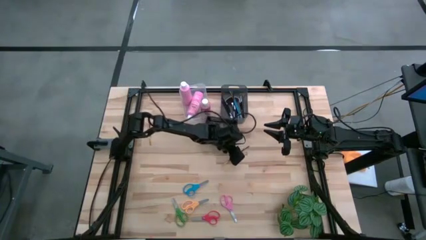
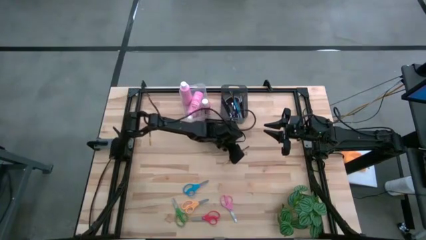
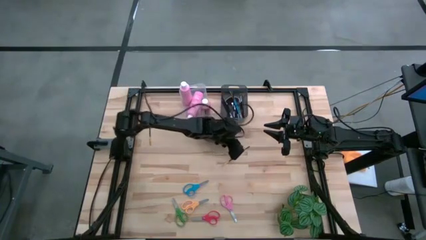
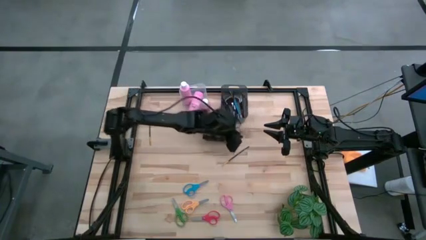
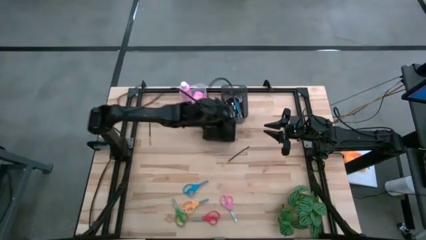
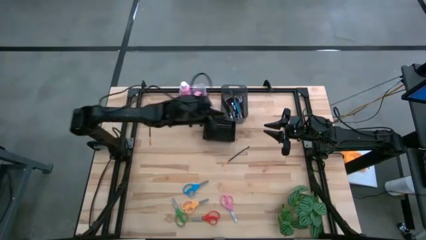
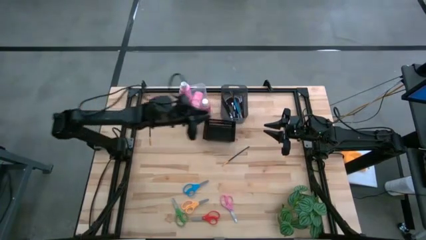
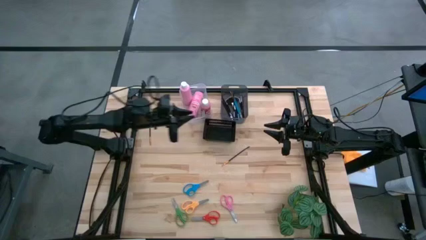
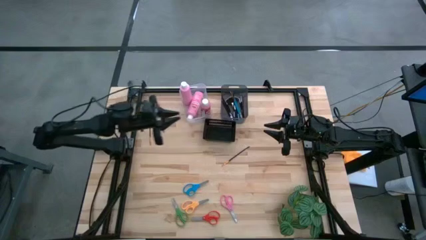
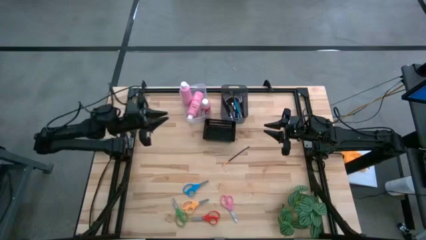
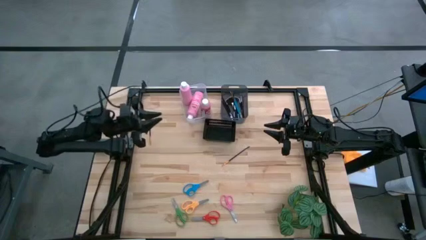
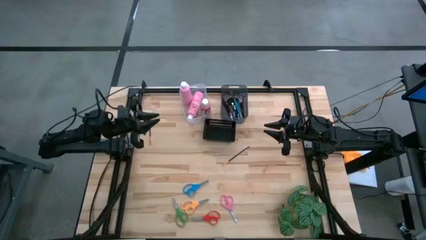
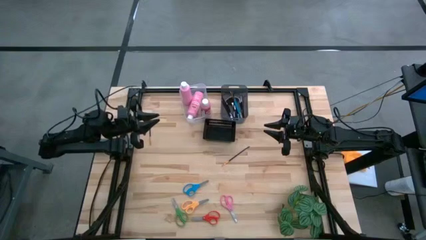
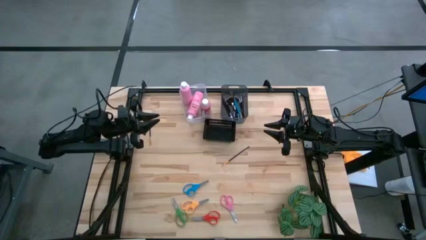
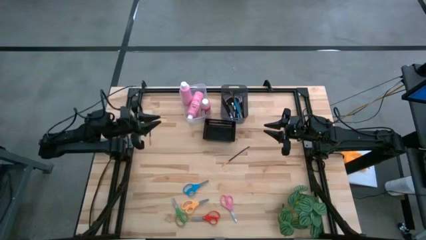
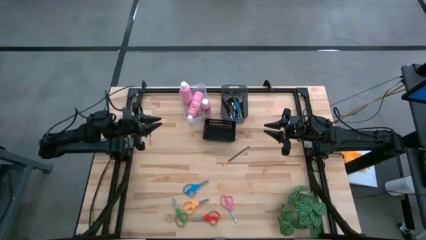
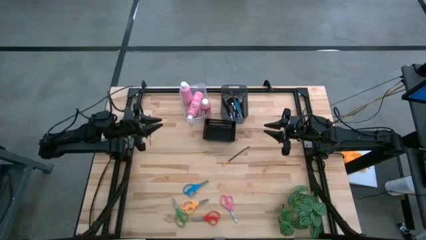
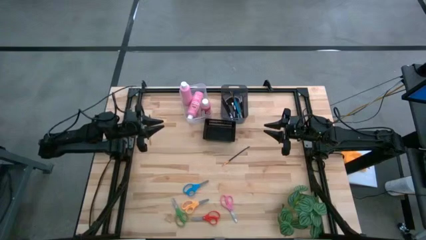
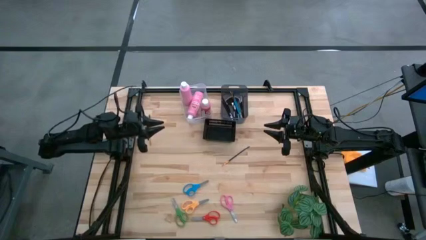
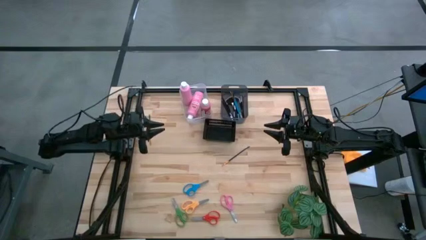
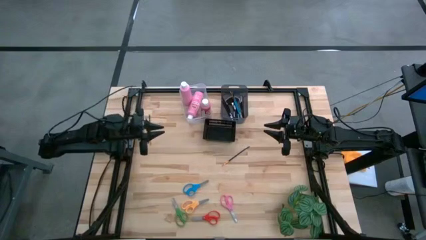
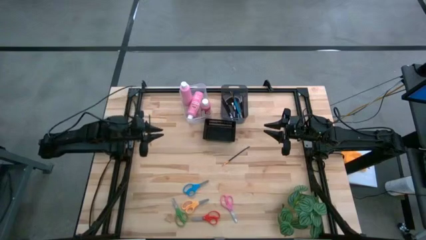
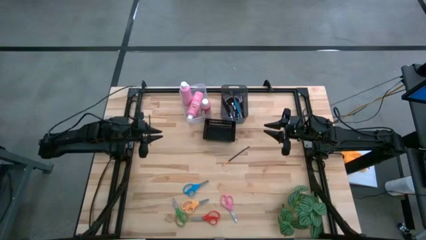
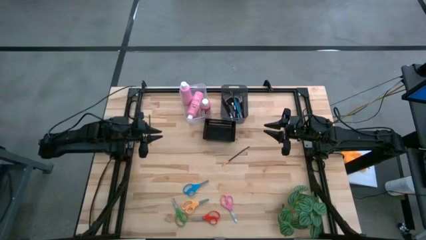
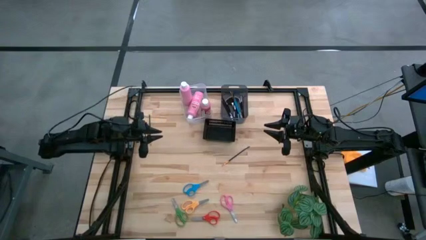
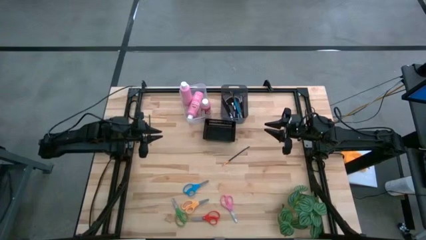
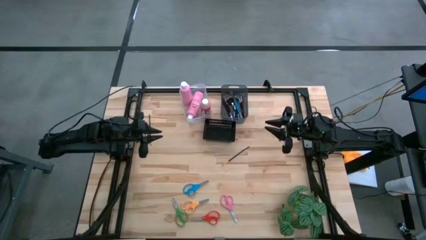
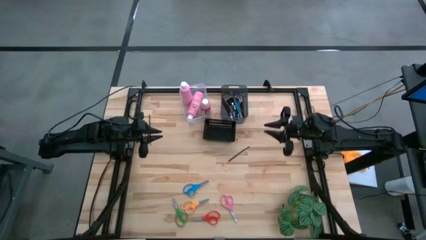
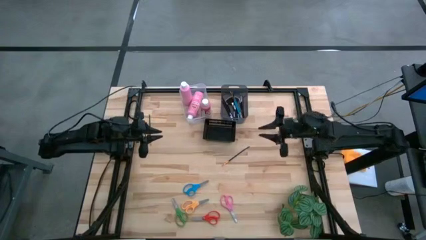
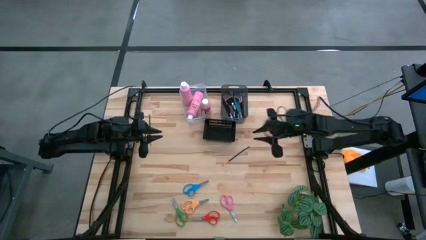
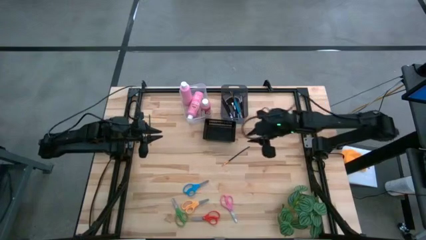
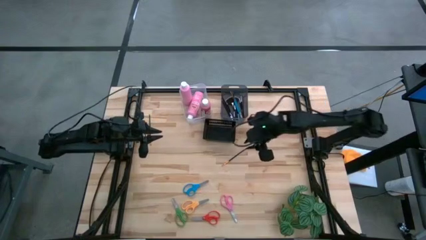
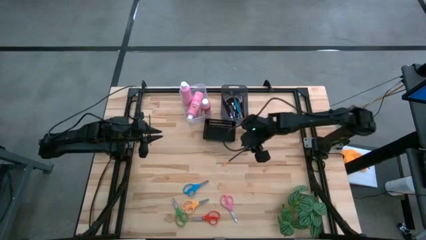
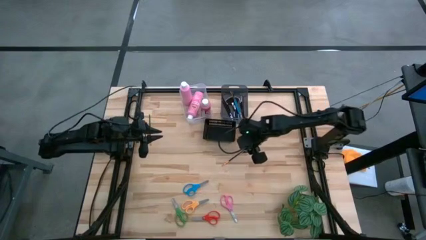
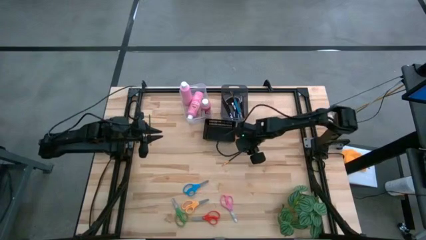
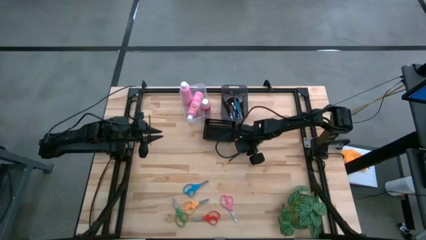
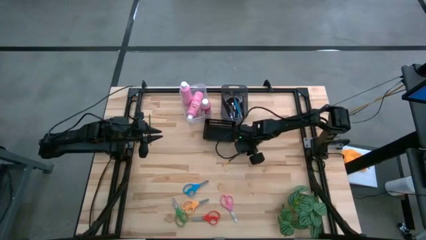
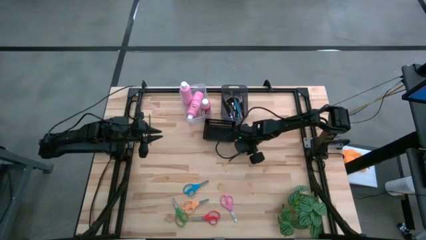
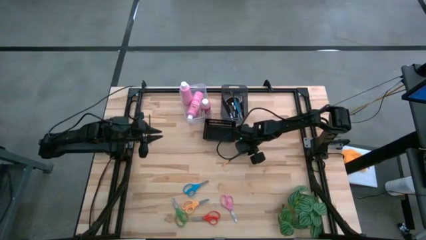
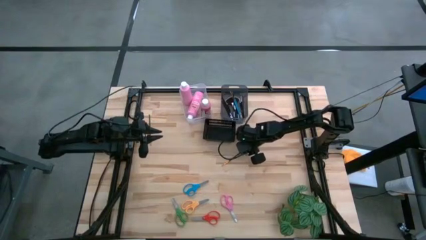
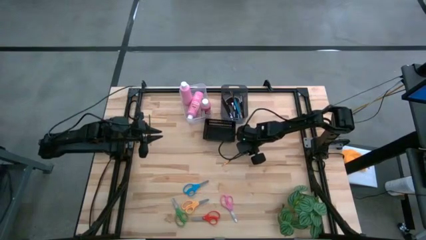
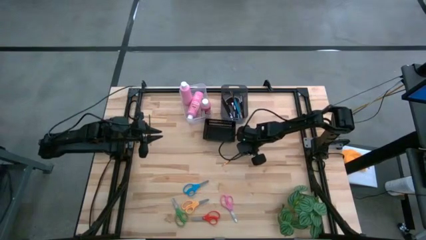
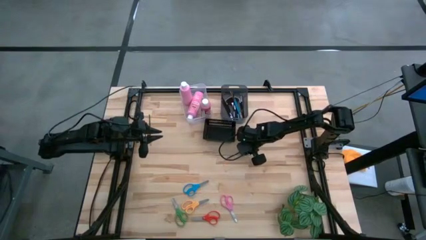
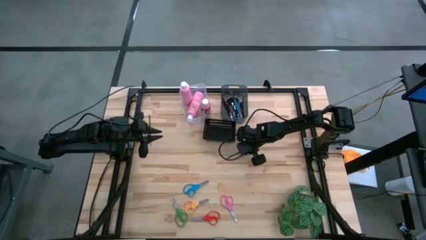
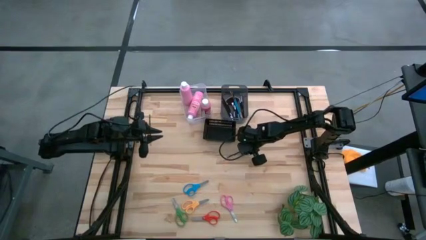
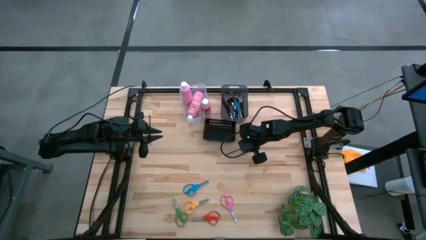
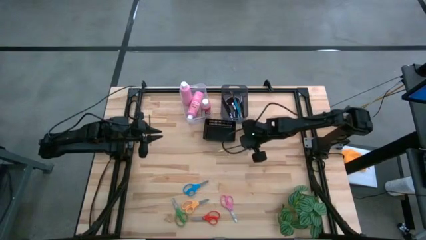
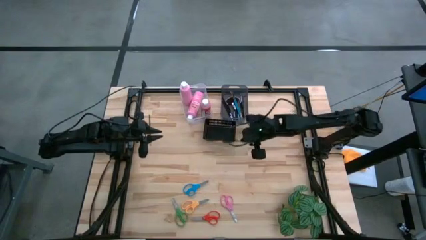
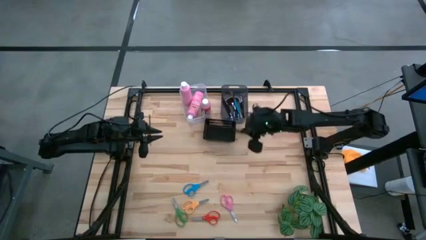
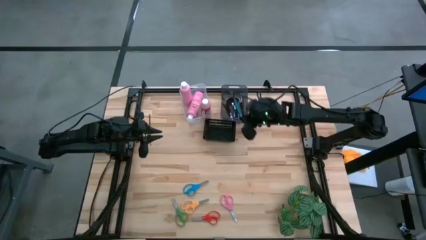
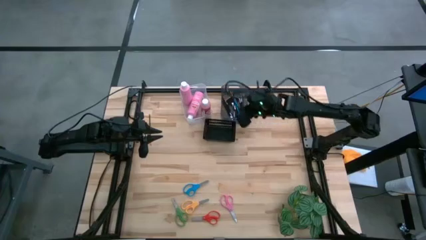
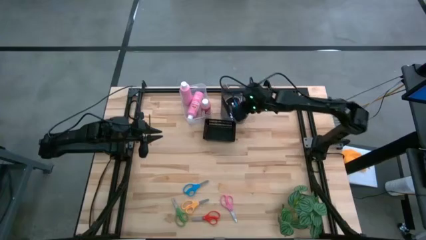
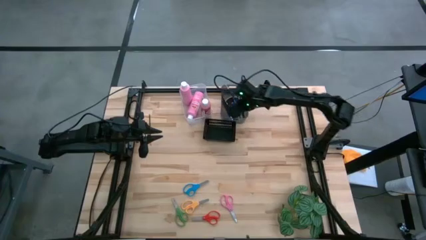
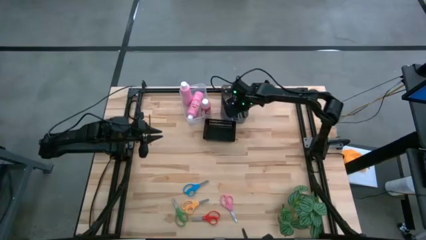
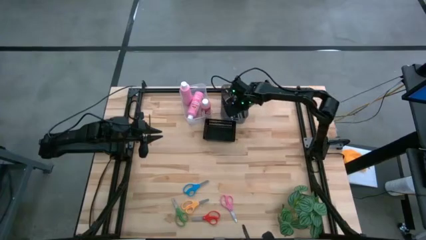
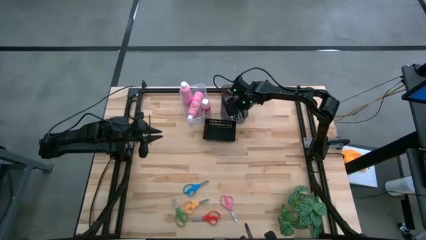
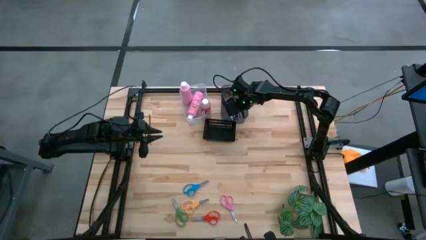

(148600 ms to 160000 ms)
Task: Pick & Place Paint Supplies
Put the black paint brush into the gray bin

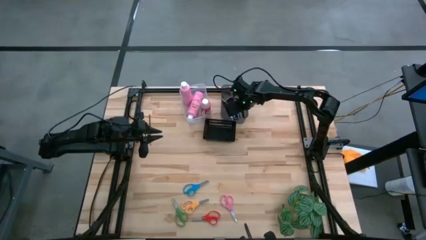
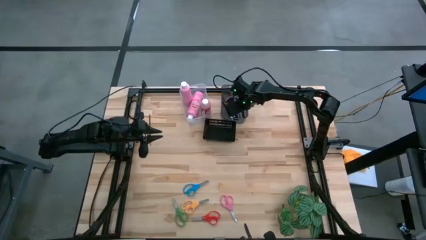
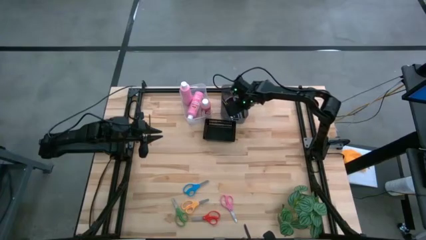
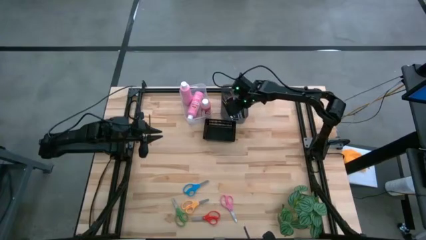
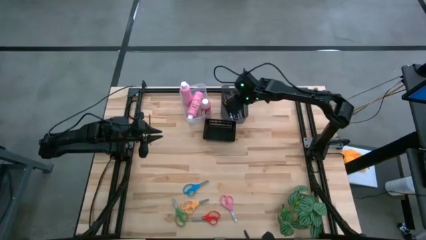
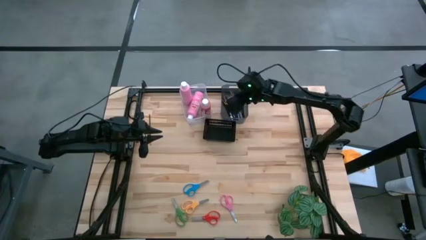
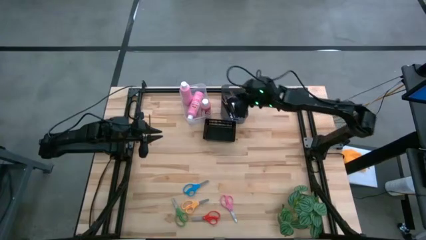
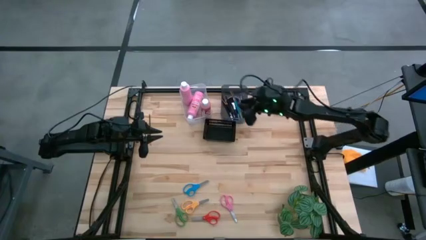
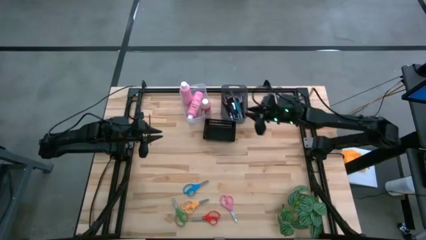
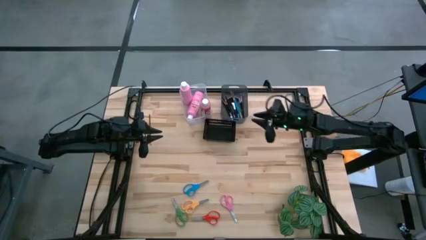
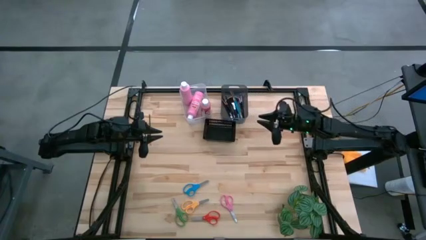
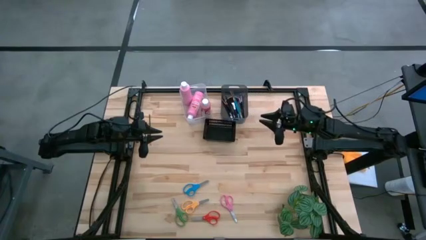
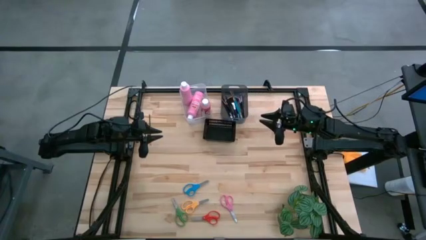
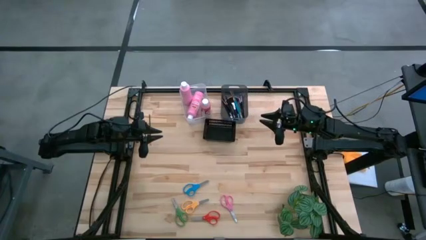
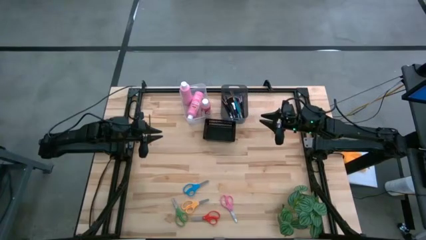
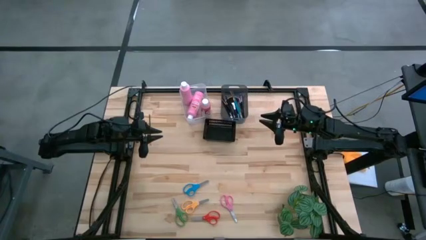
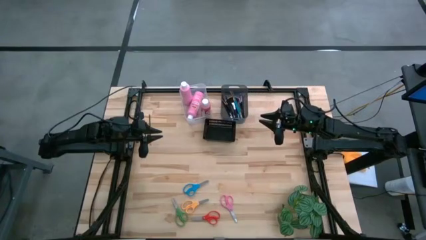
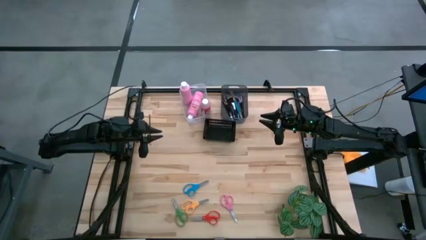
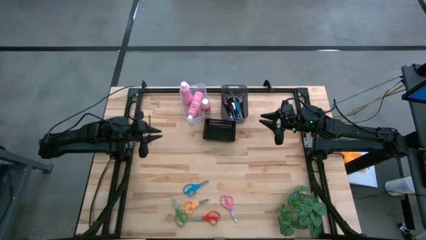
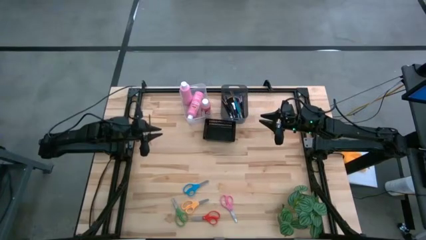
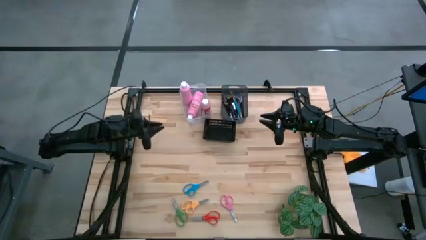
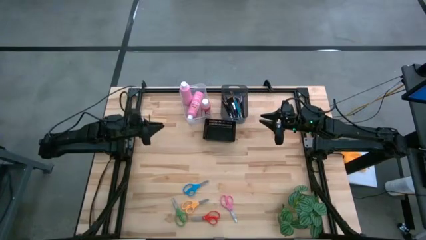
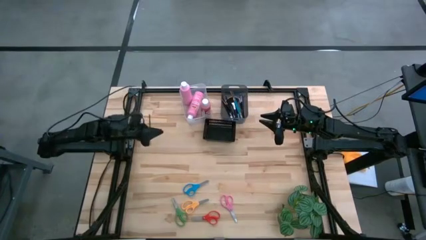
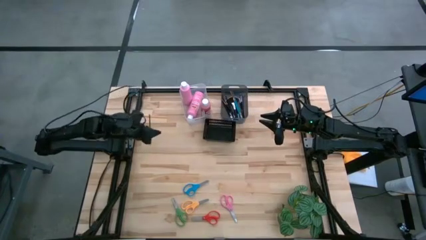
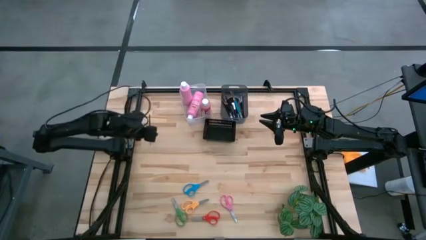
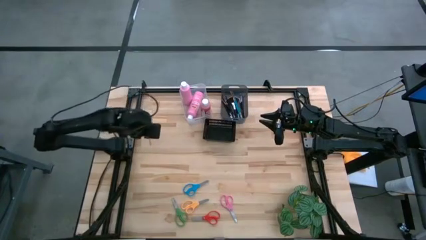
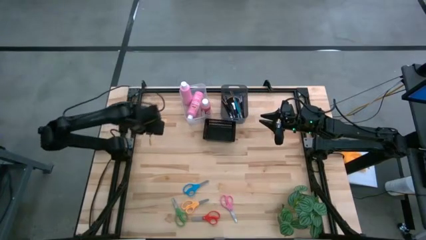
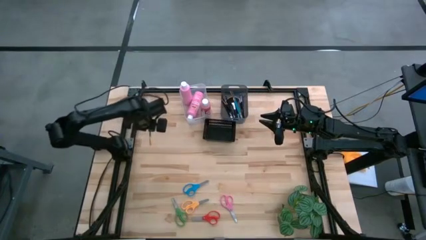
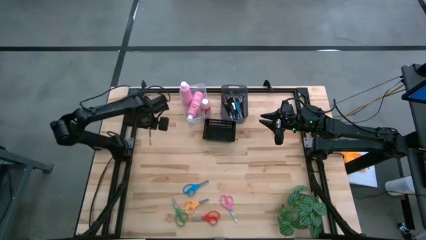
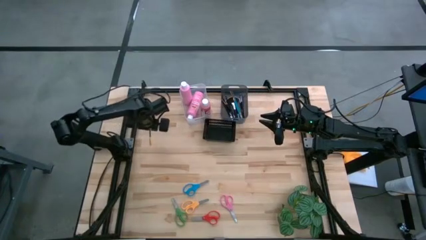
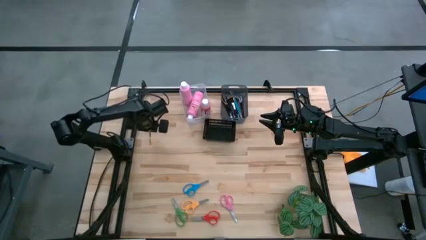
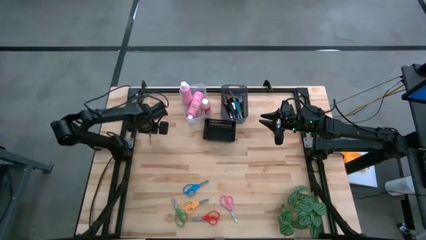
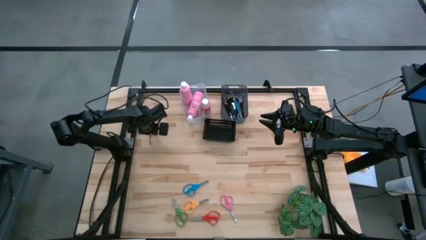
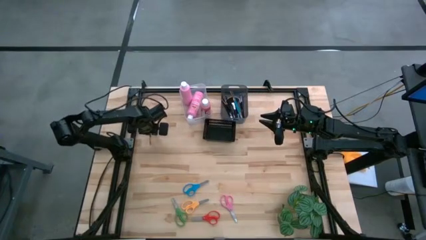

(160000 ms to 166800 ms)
Put the black paint brush into the gray bin
